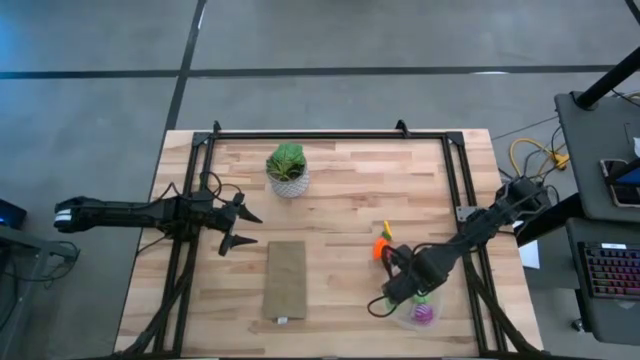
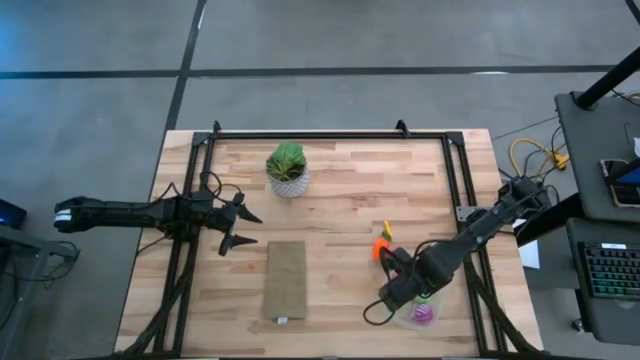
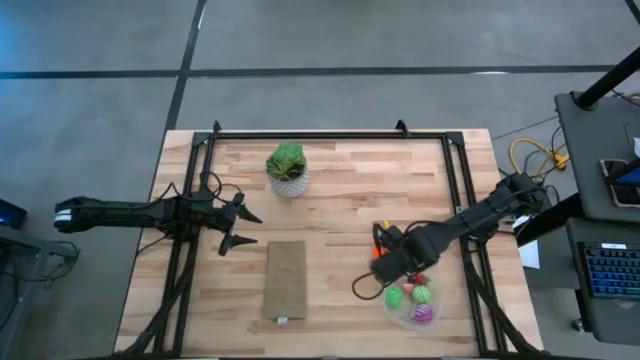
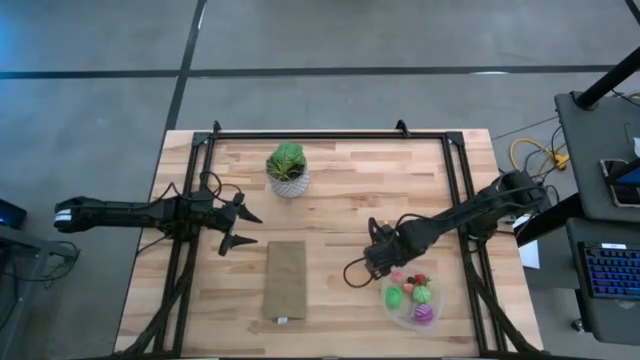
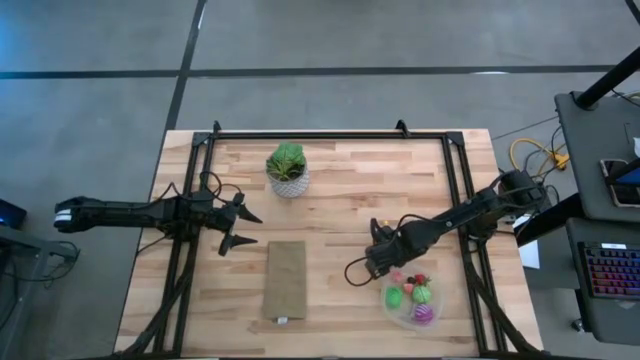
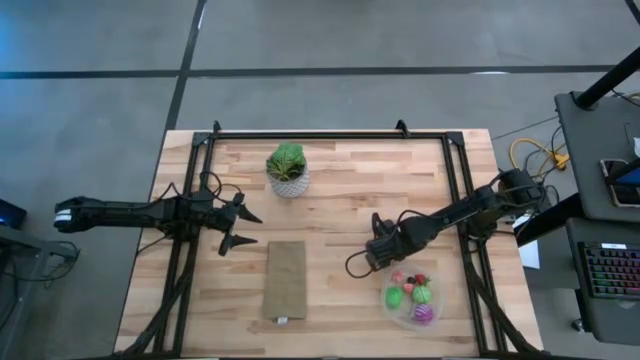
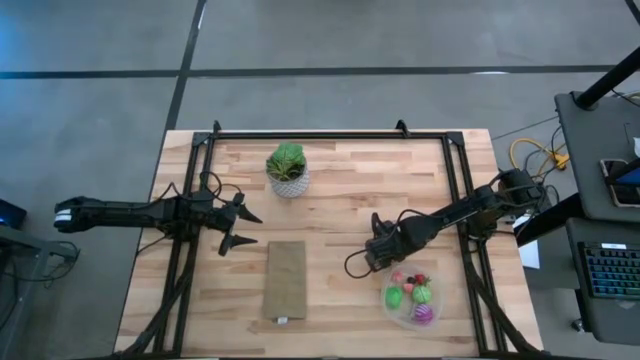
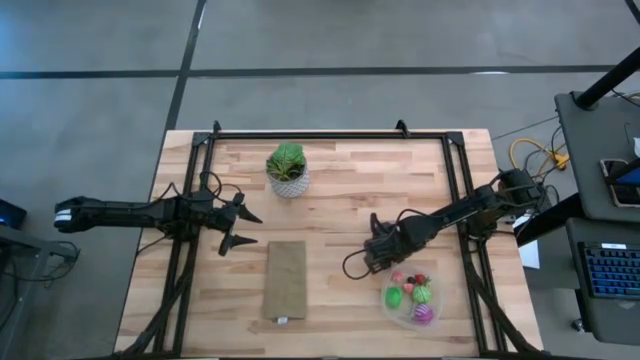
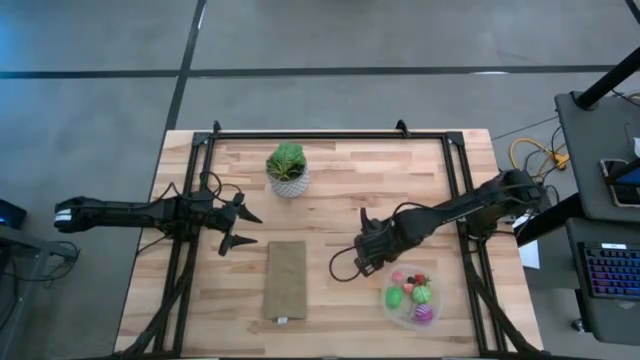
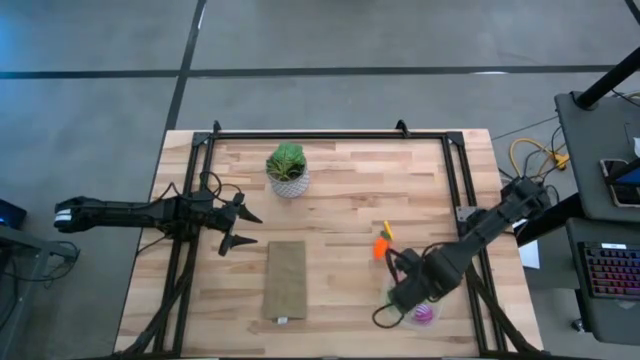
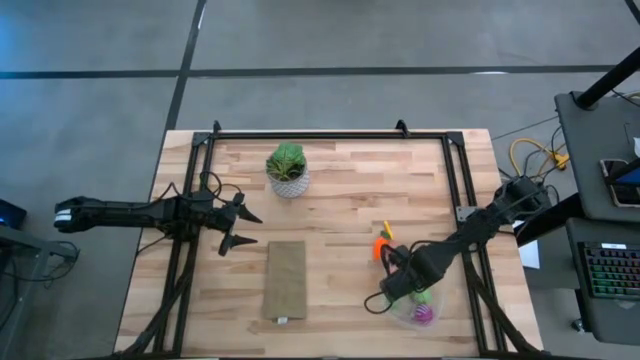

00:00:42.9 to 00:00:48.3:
Task: Pick and placing Produce into tupperware
Put the strawberry into the transparent container

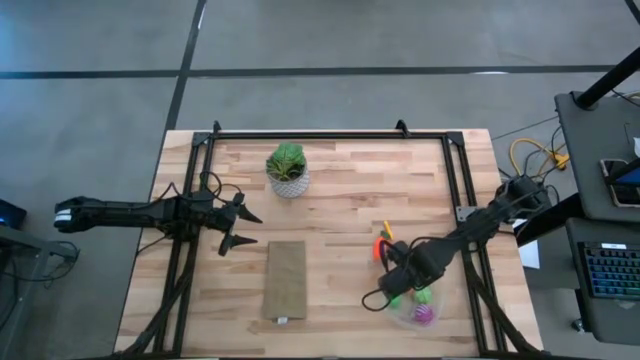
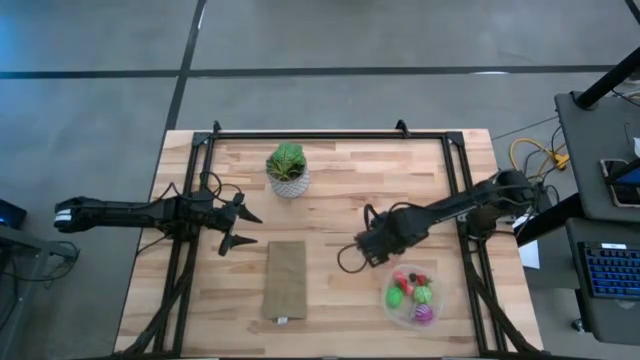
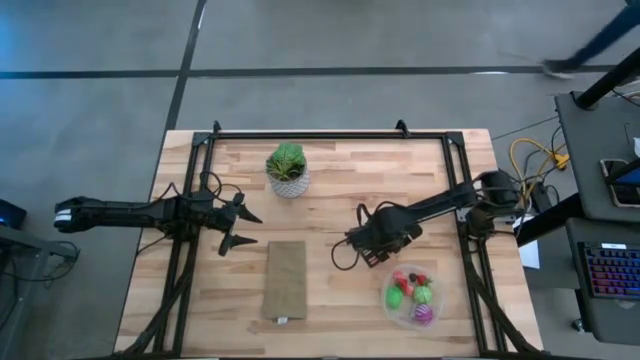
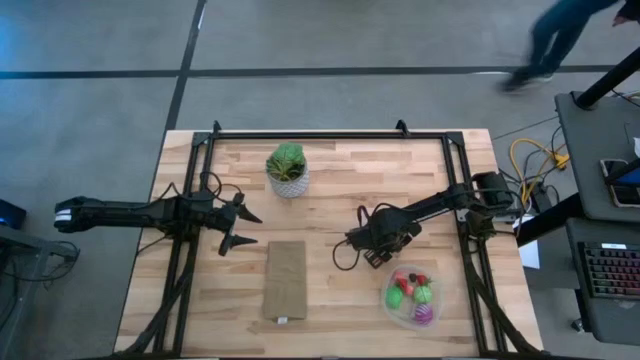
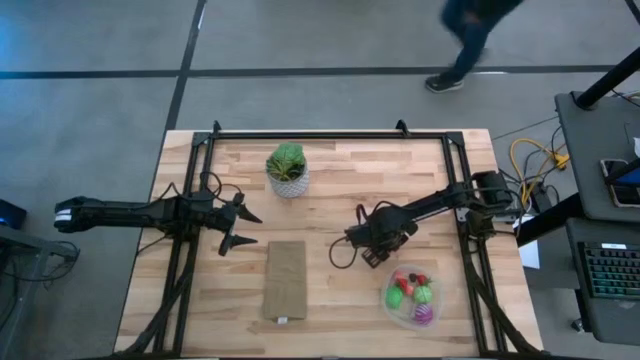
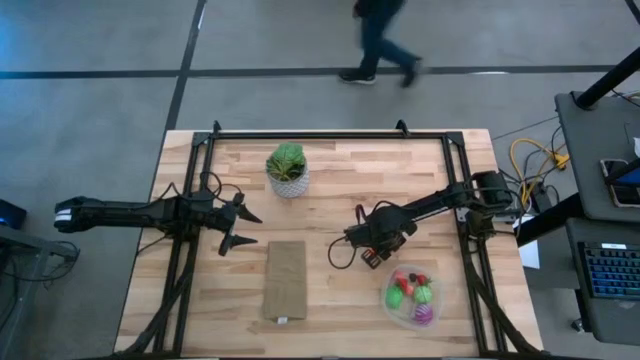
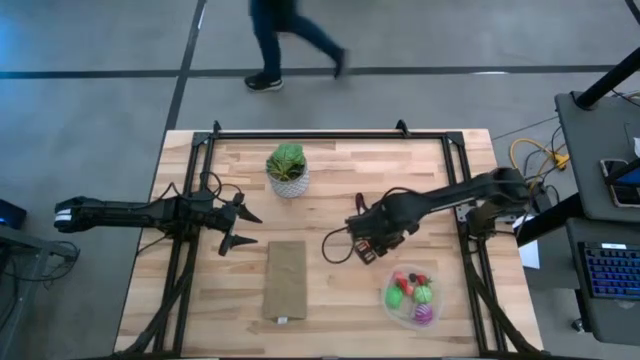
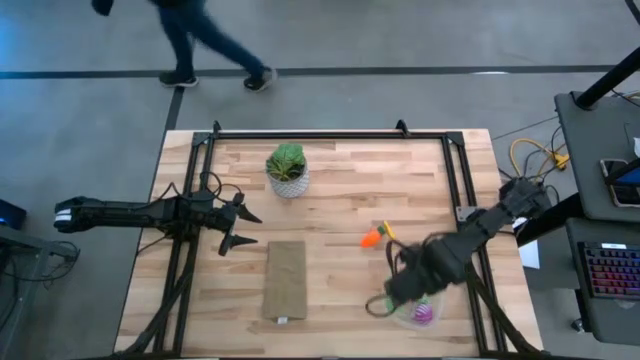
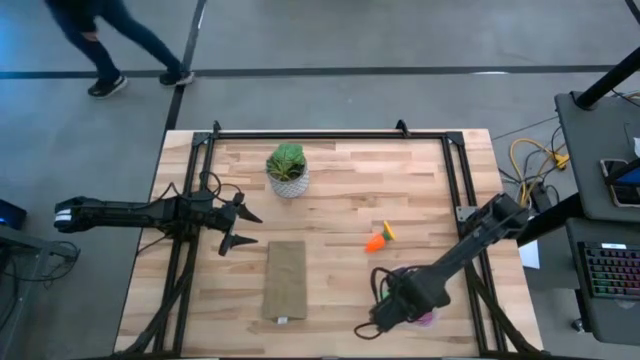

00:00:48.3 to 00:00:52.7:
Put the peach into the transparent container

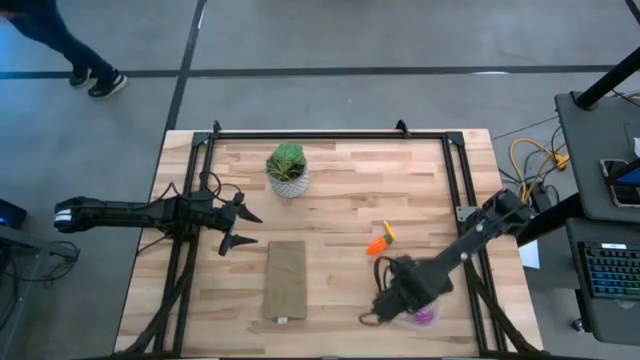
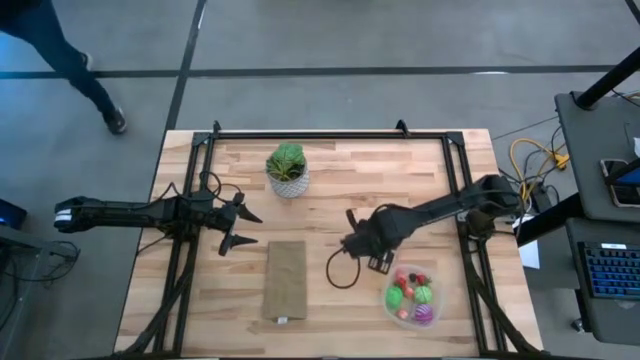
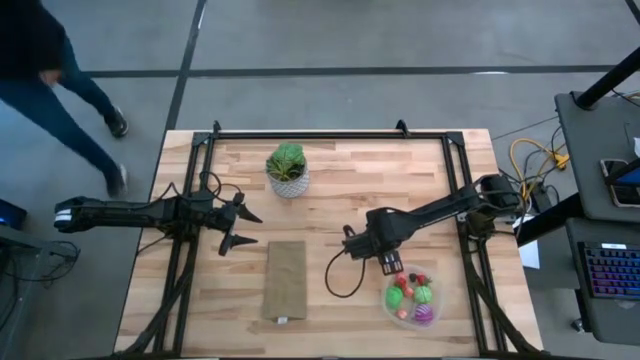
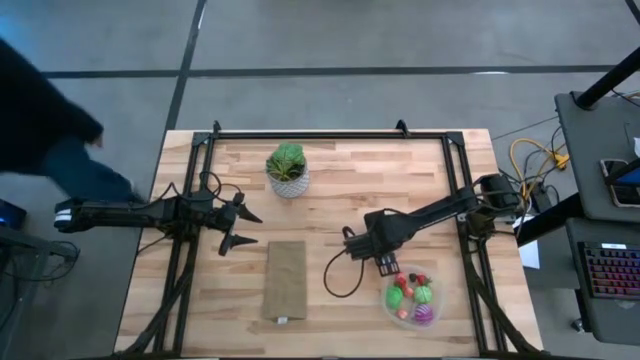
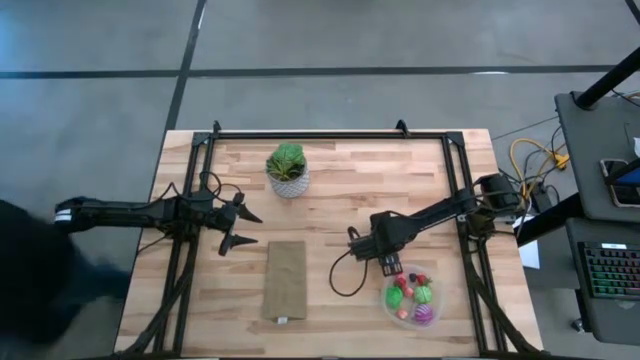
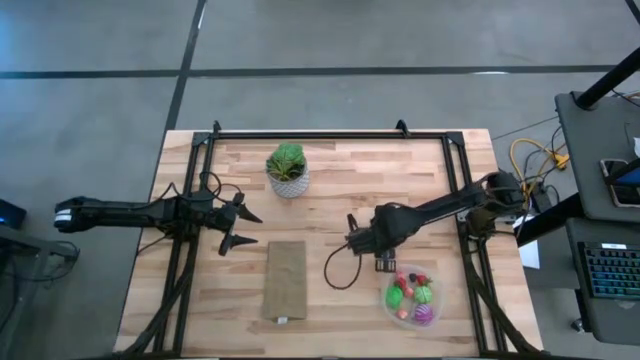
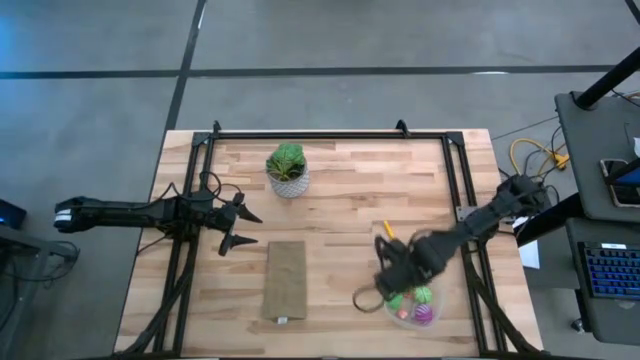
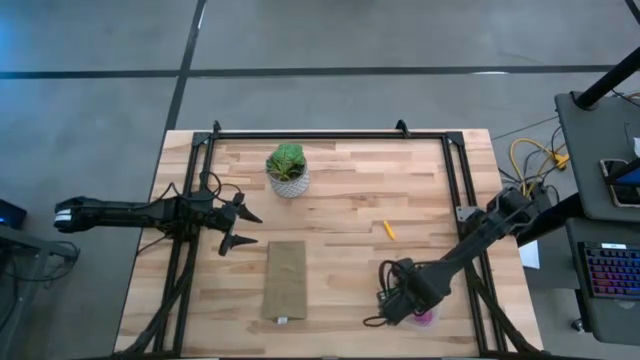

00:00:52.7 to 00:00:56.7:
Put the carrot into the transparent container

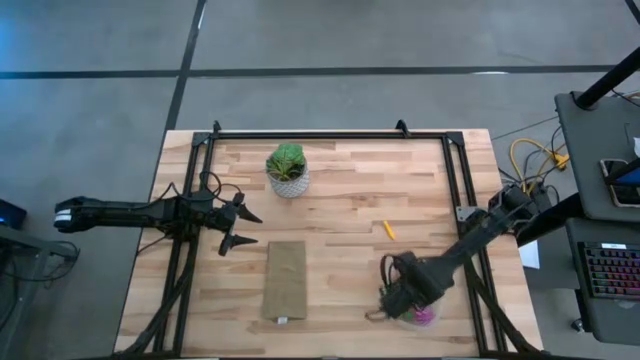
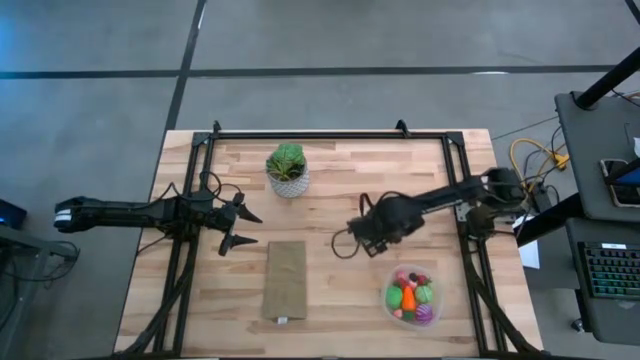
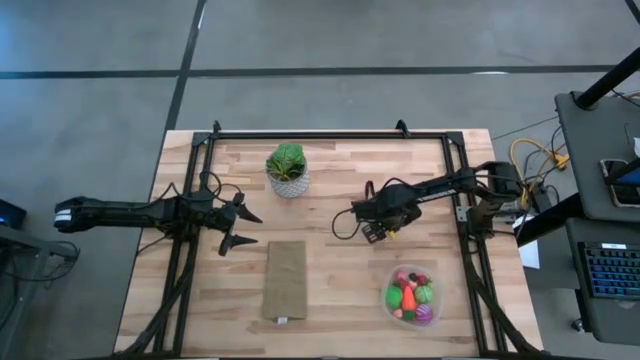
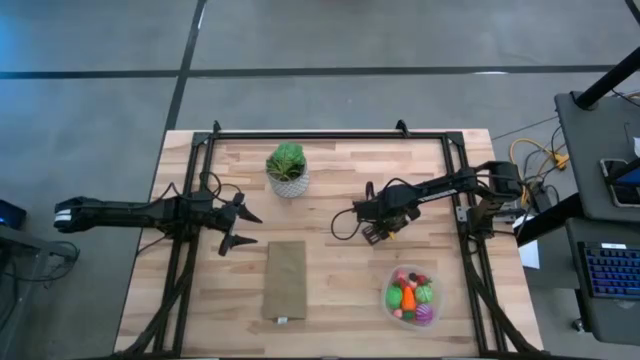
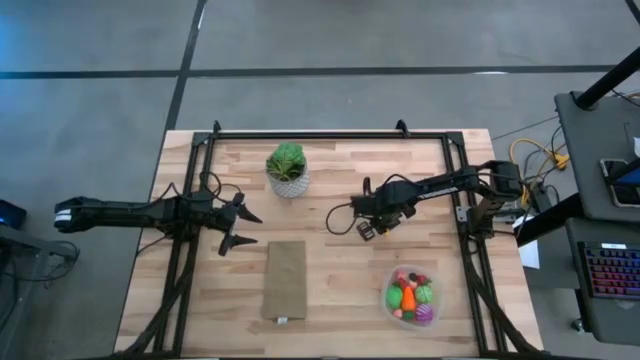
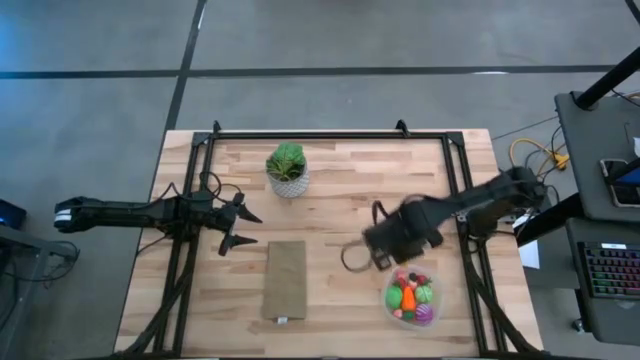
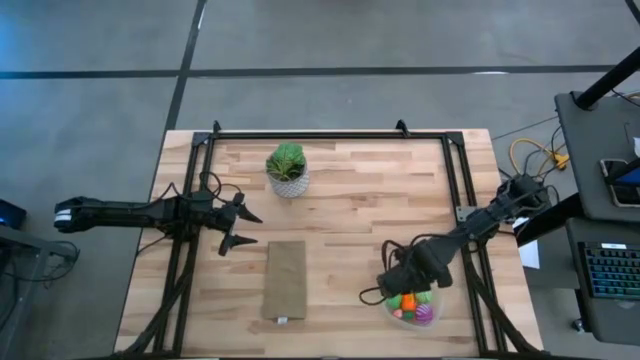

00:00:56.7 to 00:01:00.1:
Put the baby corn into the transparent container

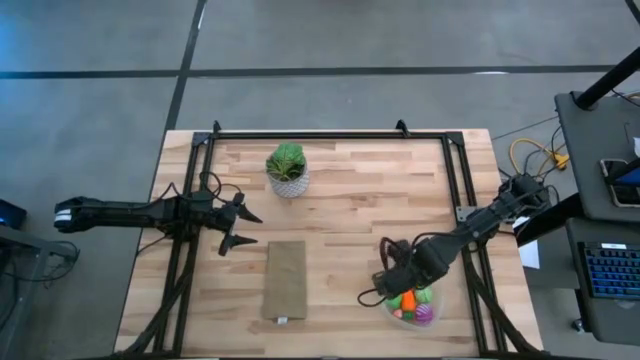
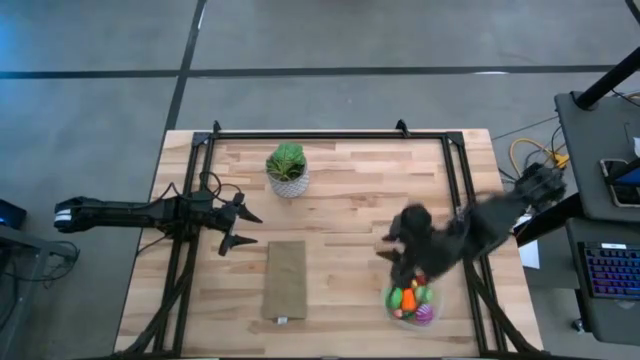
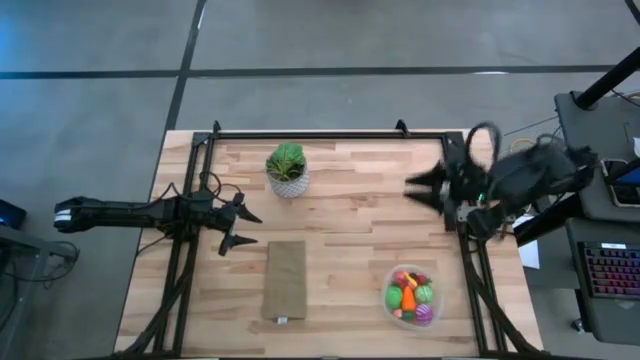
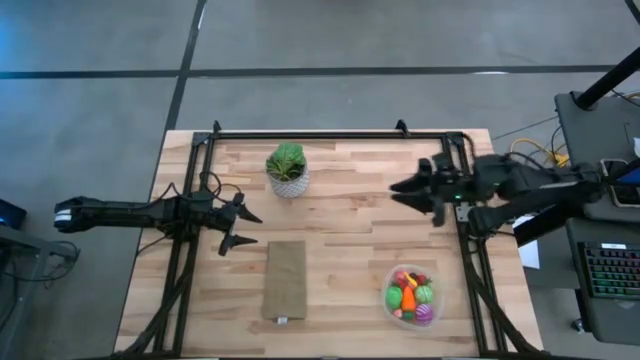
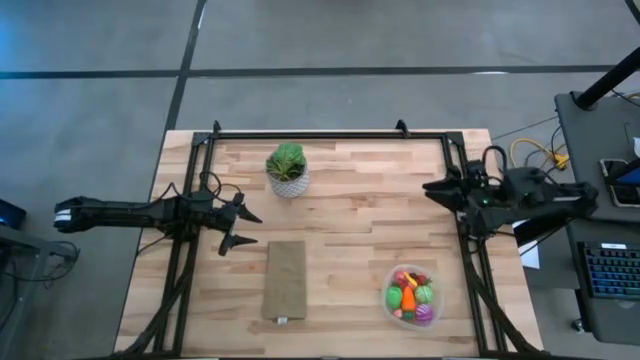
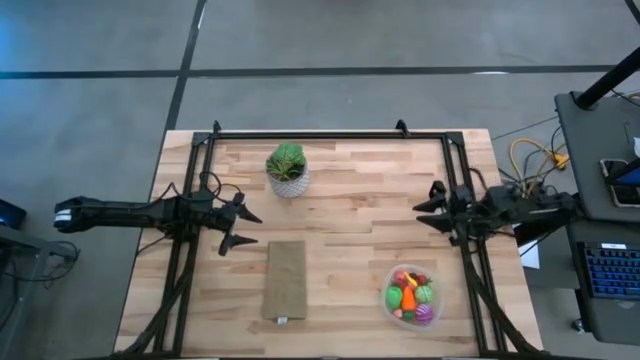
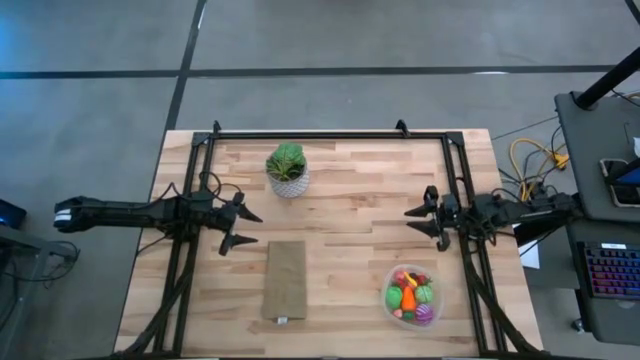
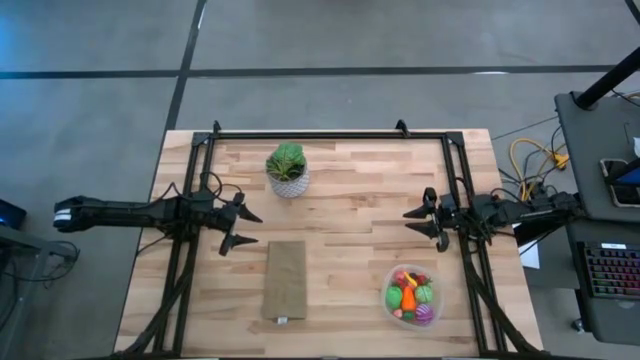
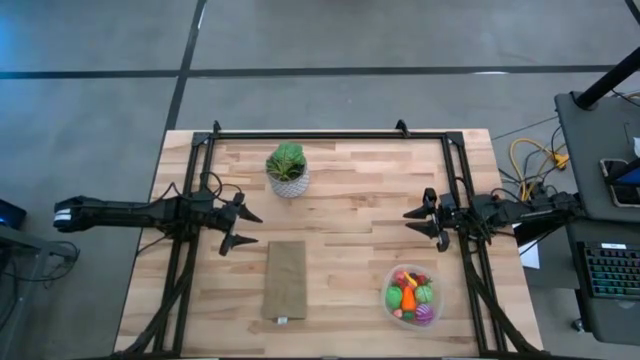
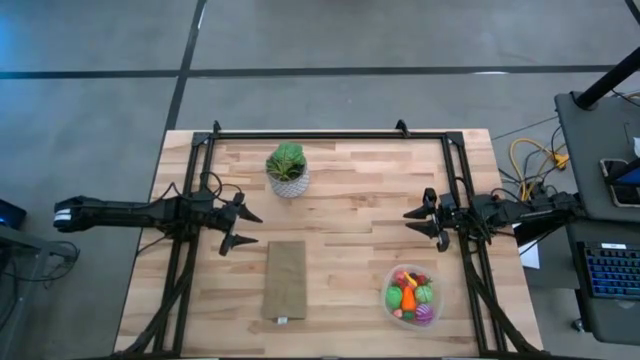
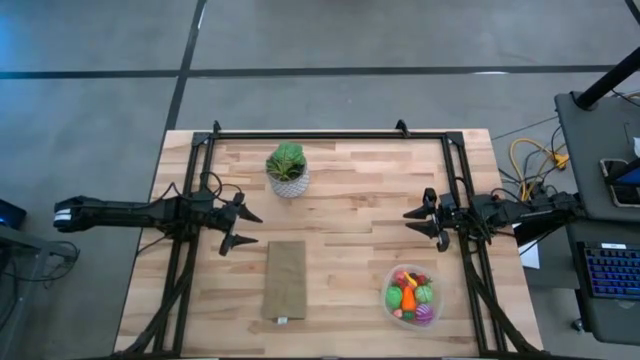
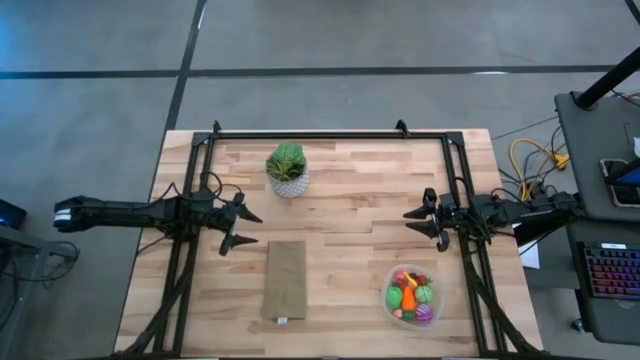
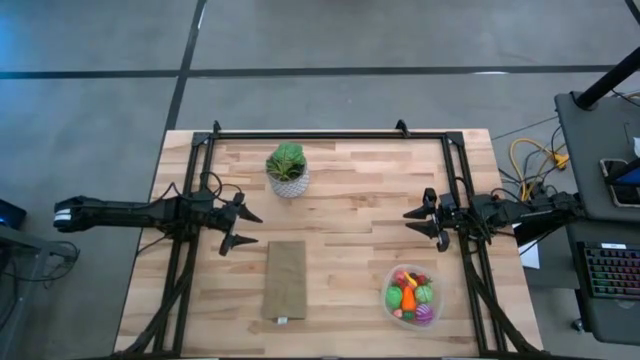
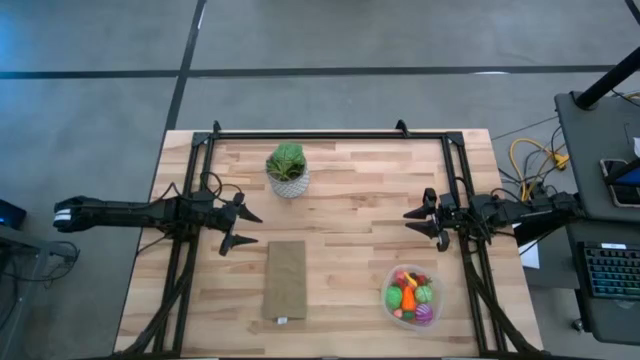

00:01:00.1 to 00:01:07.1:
Return to Home Position
